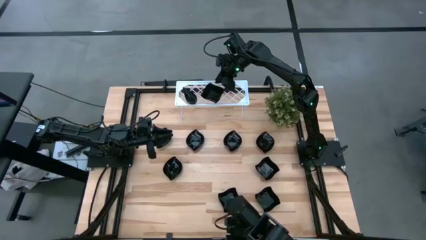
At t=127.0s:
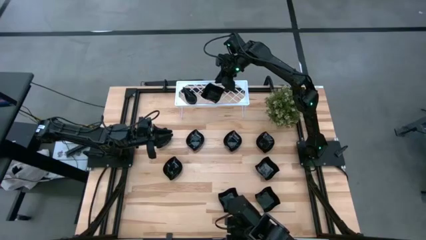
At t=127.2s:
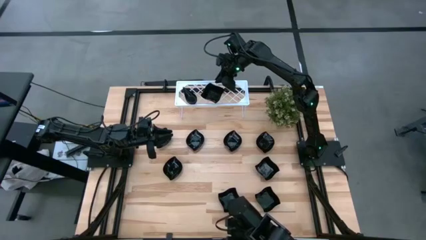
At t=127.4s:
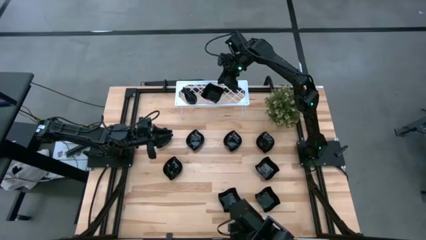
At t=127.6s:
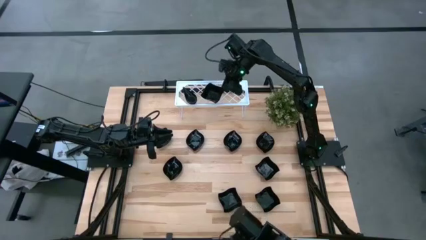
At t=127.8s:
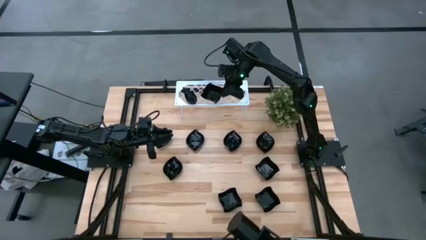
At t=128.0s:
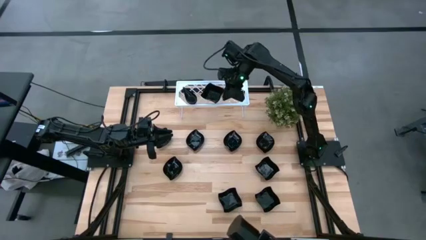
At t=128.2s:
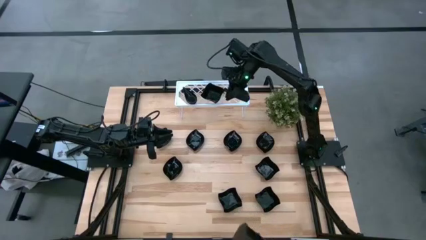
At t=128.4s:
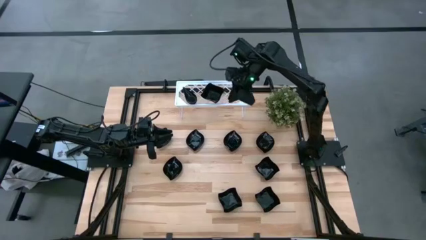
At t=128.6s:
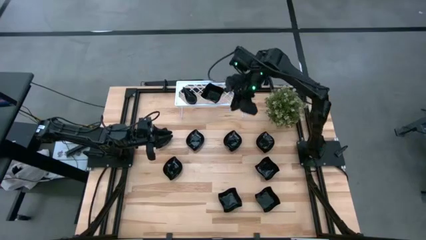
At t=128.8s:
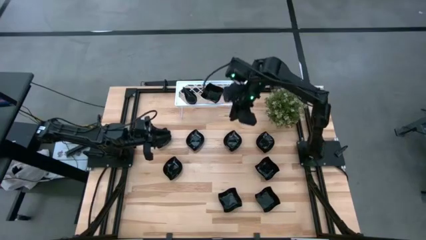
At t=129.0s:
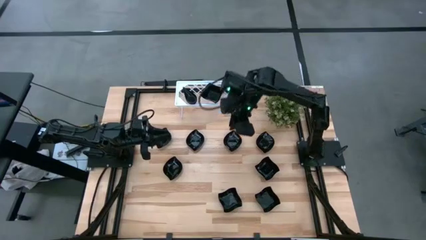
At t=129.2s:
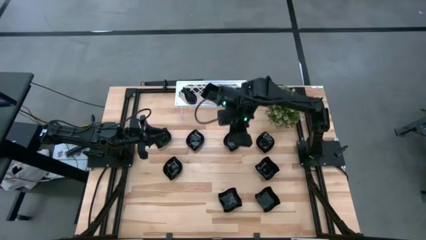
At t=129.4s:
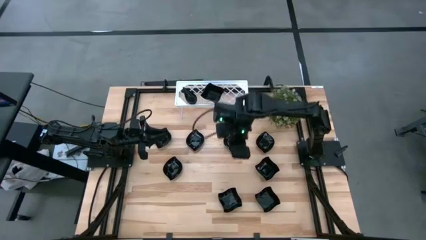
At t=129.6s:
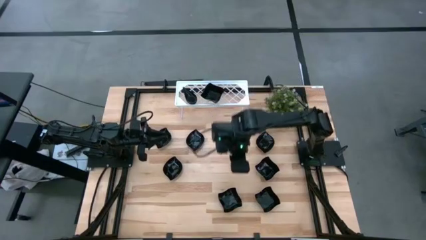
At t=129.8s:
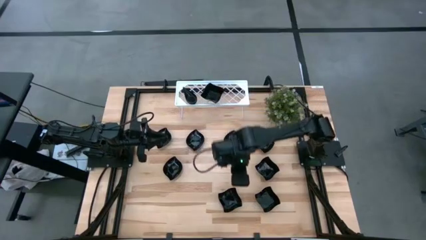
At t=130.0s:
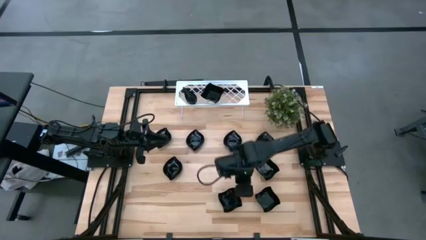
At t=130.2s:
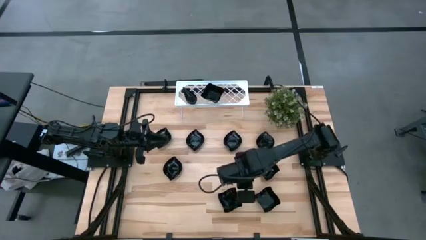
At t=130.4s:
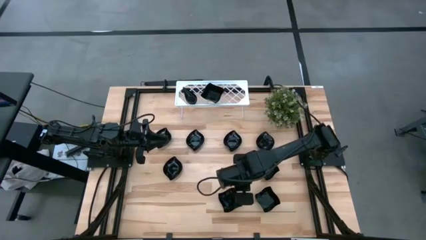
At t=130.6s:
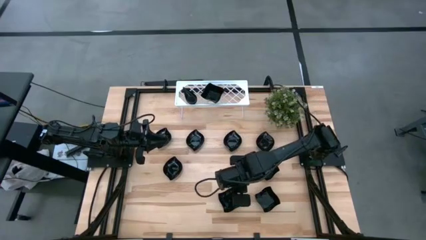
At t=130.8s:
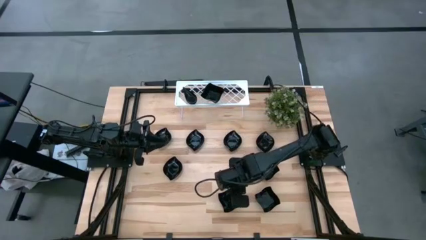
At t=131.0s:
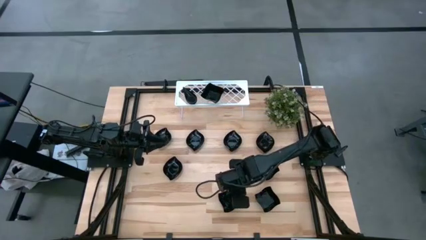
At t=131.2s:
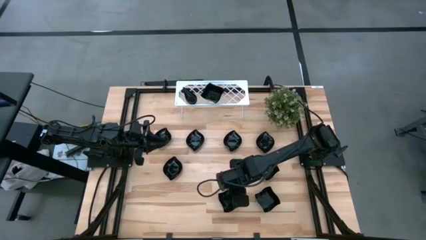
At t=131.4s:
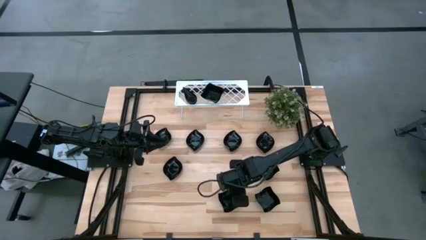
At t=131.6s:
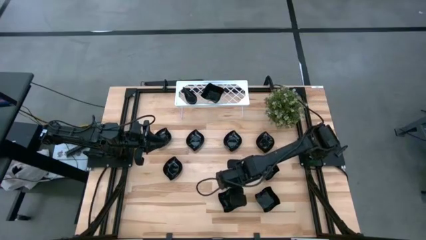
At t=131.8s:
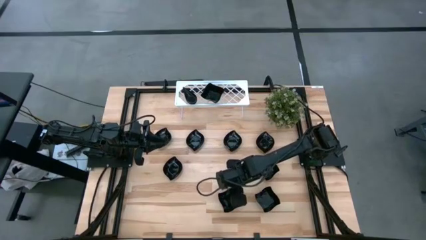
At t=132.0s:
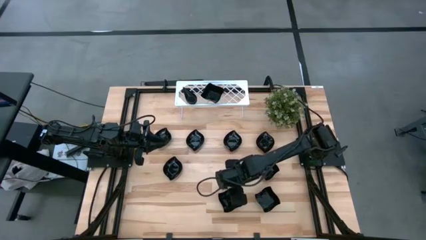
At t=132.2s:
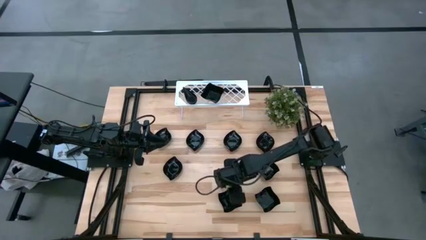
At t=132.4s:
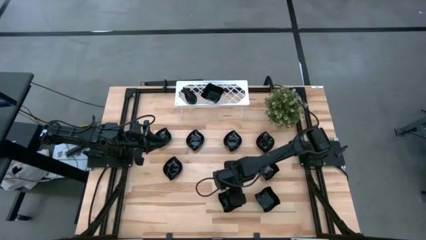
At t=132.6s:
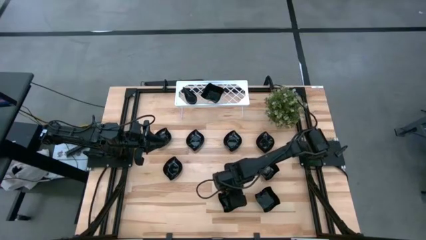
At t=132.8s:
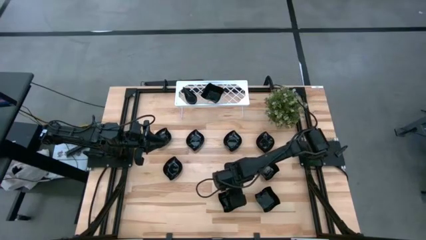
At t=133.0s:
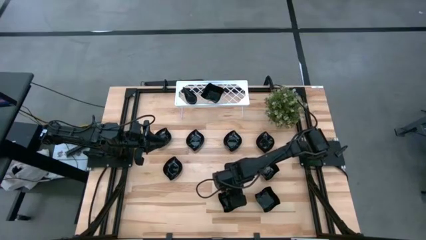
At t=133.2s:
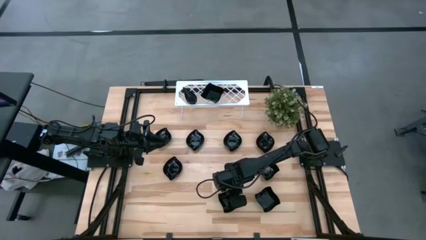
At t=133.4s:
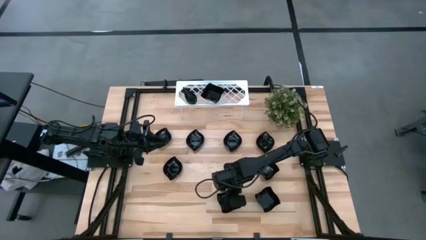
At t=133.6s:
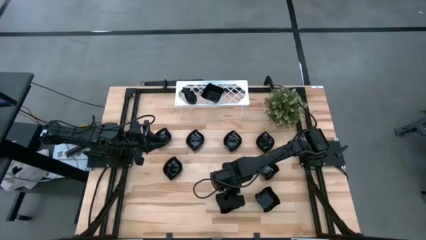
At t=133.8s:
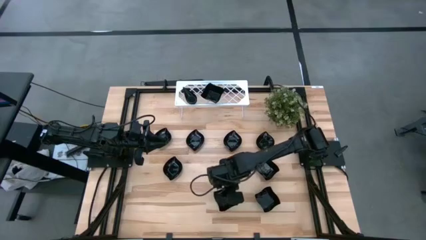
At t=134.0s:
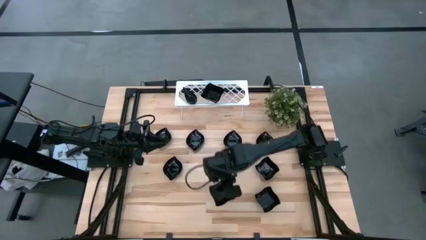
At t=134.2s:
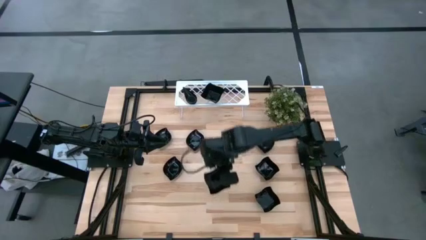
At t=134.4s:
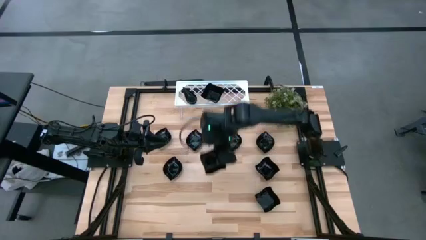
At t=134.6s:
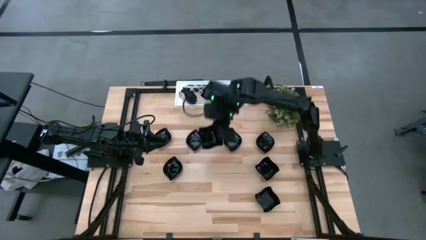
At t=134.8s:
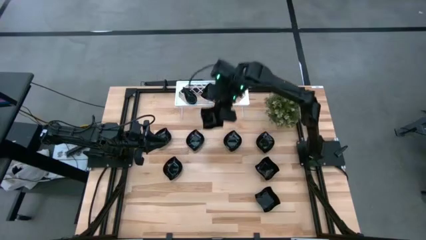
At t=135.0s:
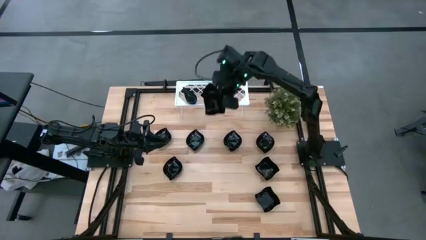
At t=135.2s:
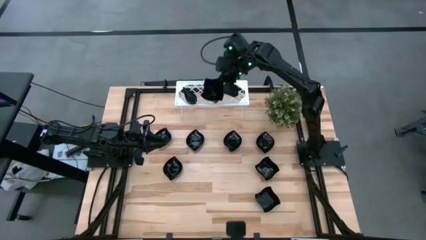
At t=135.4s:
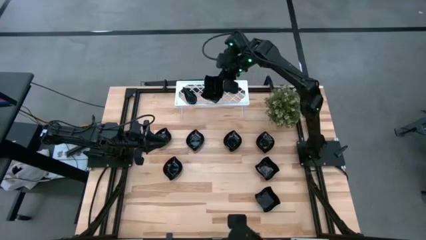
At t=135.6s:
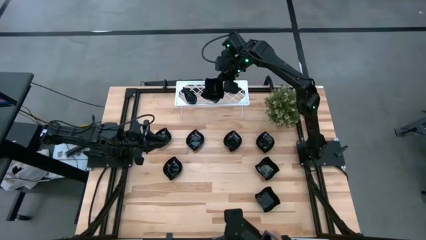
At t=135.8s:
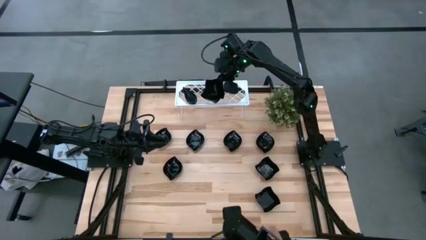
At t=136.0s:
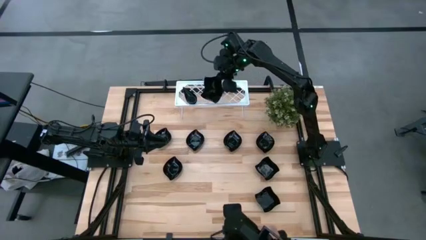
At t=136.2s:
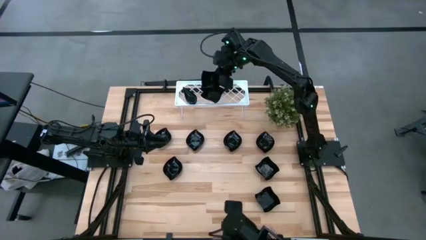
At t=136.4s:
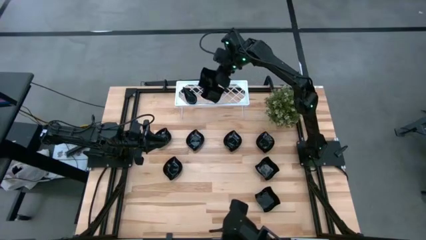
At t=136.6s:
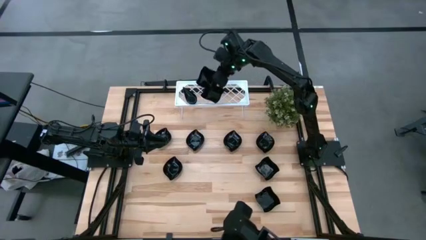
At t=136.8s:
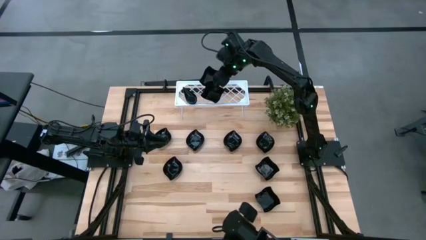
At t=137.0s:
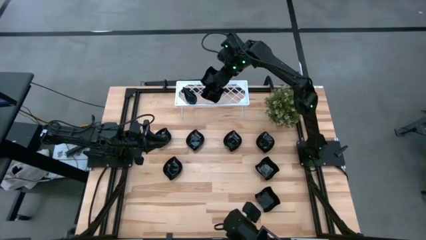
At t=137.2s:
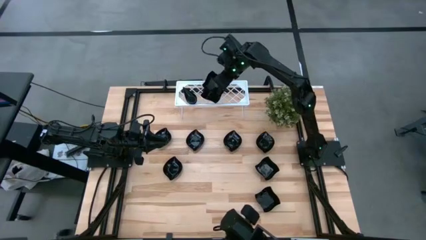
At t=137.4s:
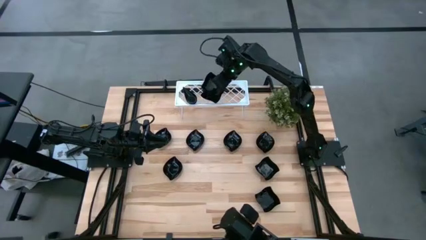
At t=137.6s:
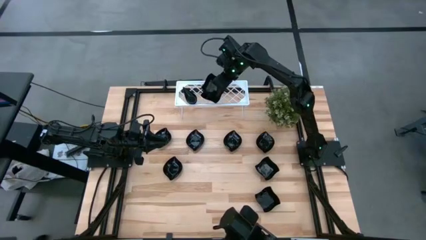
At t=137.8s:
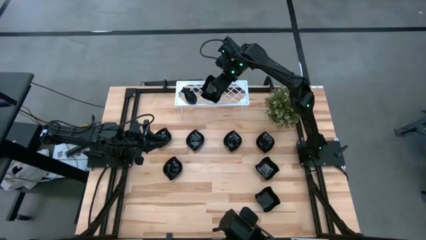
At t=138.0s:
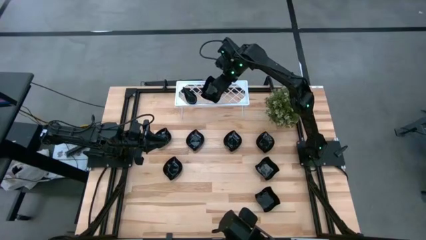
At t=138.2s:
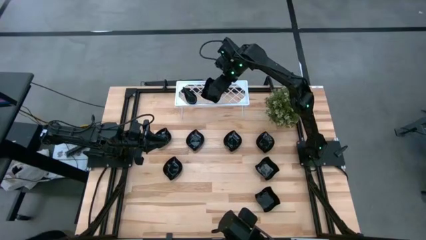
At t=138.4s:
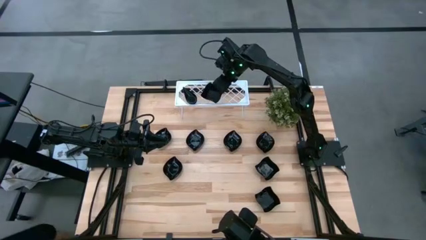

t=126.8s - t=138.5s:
Task: Pick & Place Mini shaped plates
Stack the bottom black left black distorted square plate on top of the black distorted square plates on the shelf

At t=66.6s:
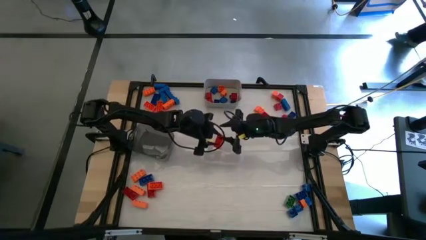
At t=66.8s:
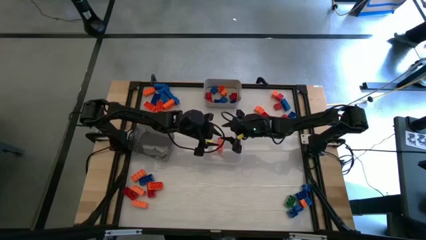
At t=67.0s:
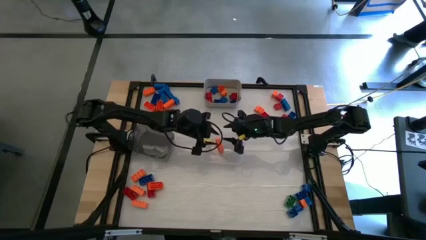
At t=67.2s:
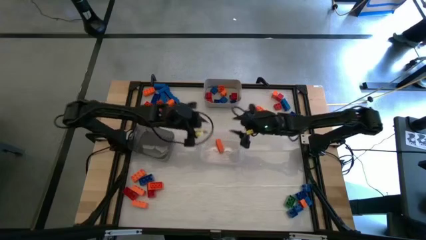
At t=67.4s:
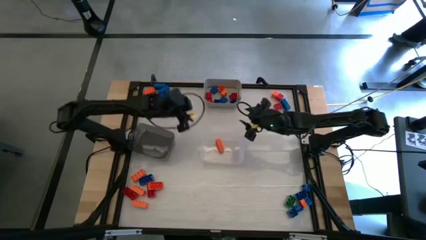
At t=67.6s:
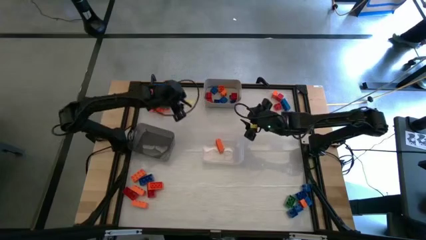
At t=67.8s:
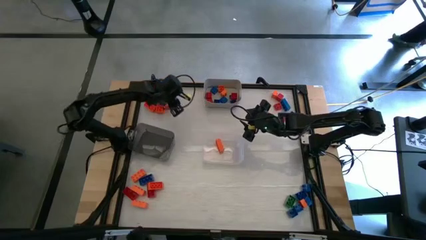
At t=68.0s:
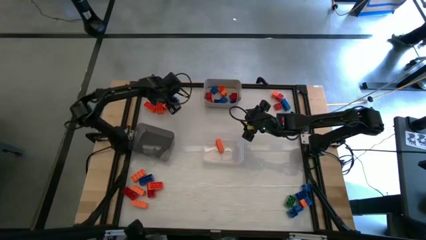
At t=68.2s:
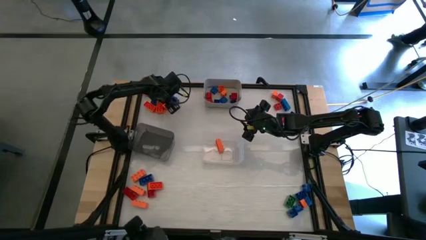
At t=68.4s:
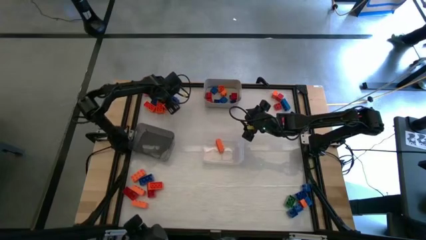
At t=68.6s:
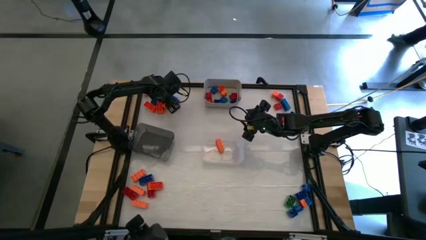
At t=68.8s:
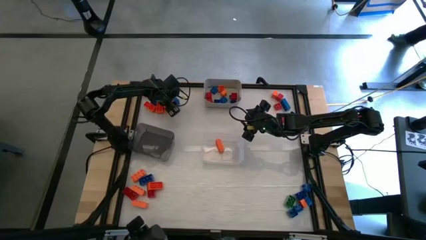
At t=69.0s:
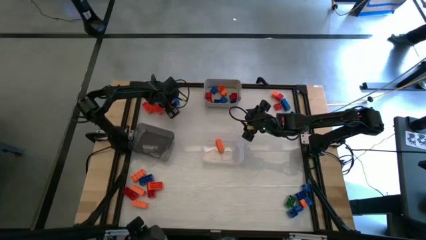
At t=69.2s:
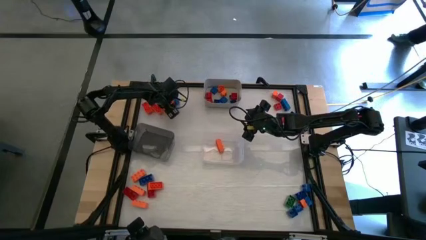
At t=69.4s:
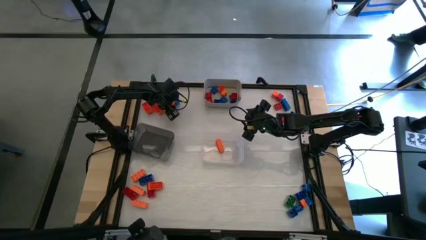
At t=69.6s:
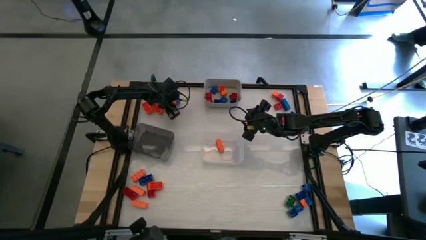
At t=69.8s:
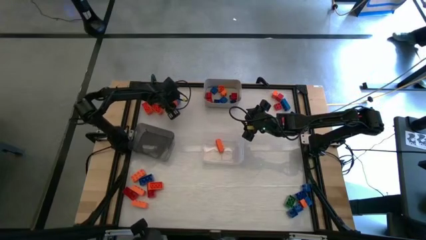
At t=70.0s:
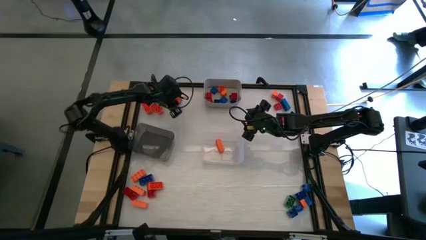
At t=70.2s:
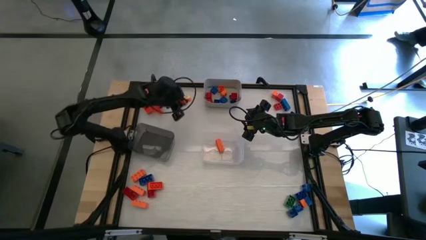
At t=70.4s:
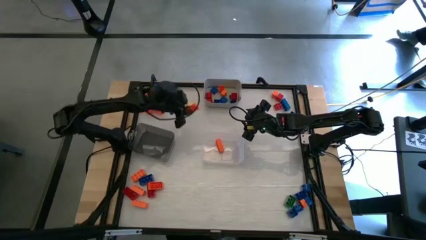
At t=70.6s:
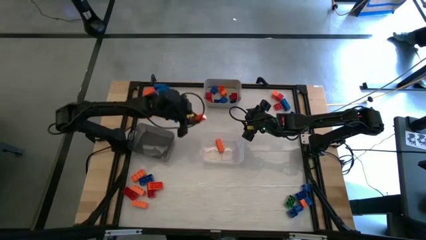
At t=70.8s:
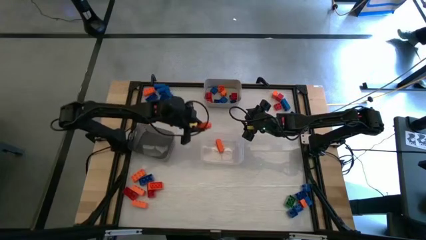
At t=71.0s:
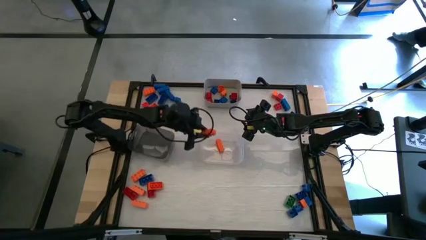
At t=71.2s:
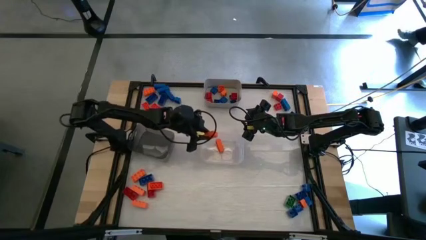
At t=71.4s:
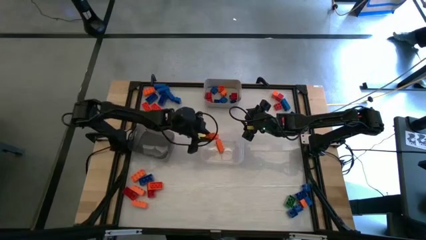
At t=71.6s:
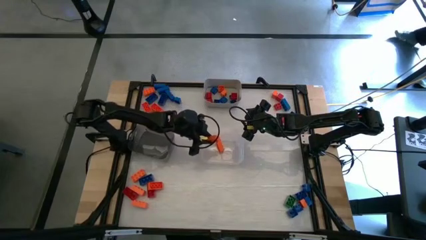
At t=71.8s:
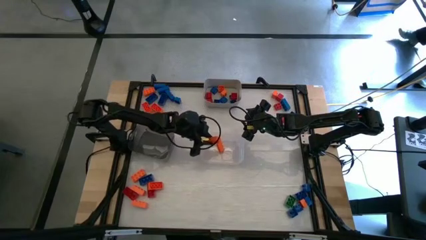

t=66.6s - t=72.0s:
Task: Sort blocks by size
Put the big orange game piece into the transparent bin
